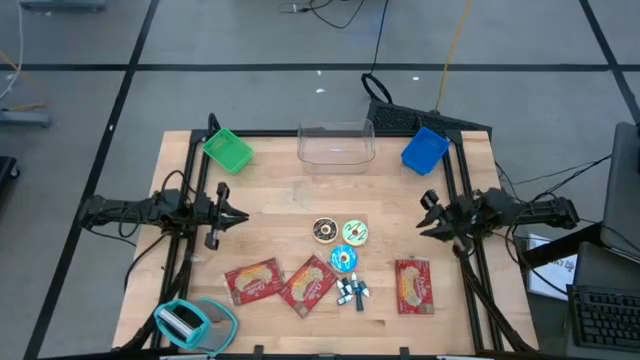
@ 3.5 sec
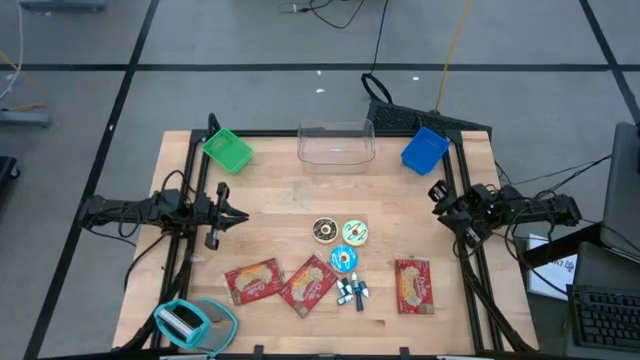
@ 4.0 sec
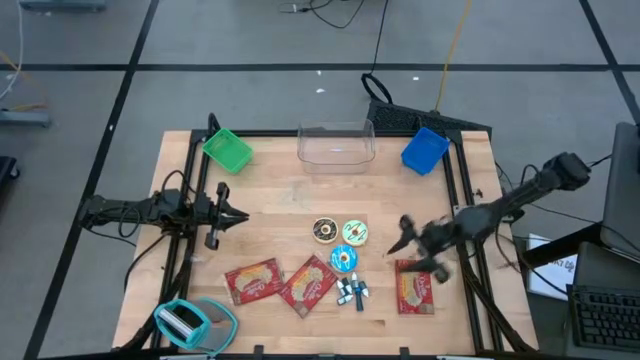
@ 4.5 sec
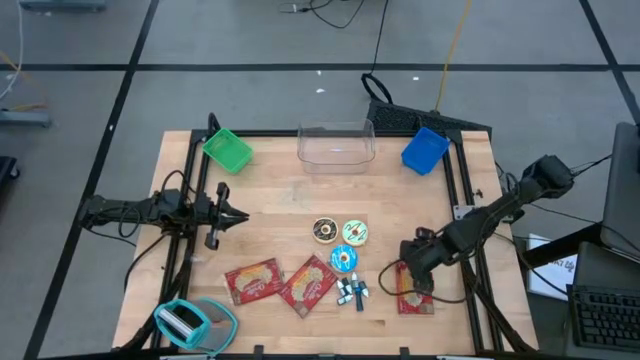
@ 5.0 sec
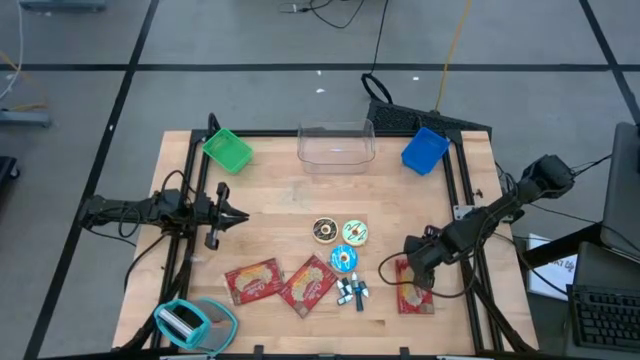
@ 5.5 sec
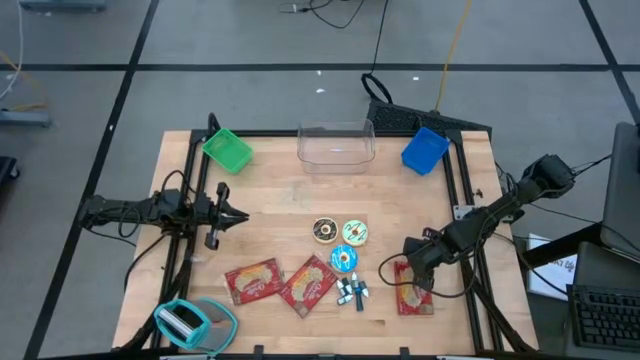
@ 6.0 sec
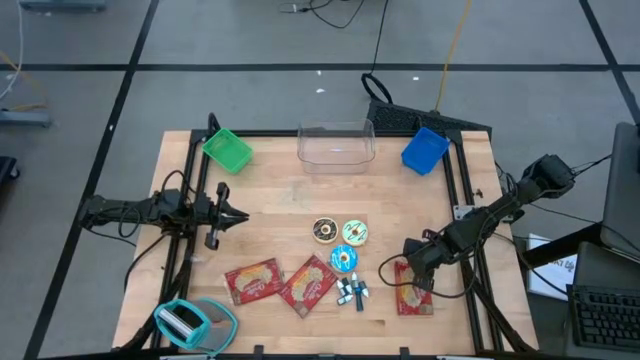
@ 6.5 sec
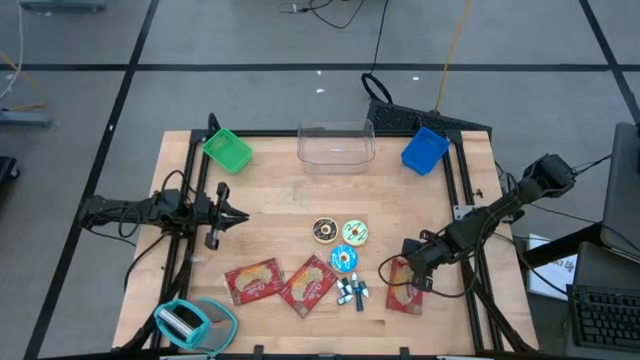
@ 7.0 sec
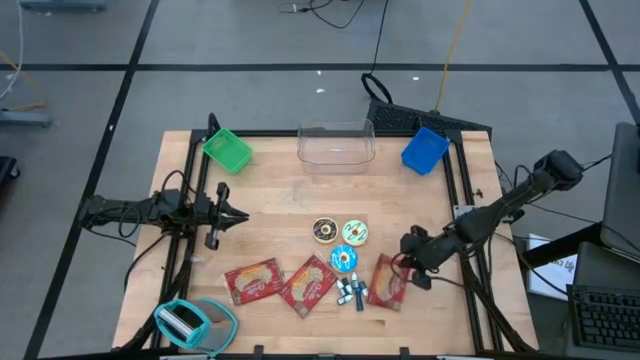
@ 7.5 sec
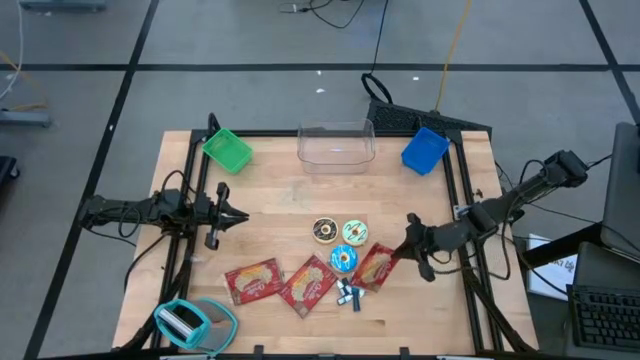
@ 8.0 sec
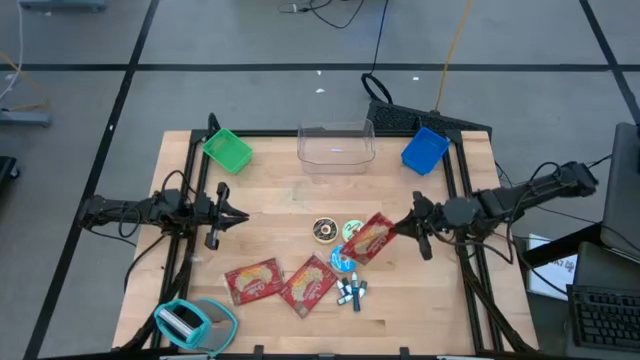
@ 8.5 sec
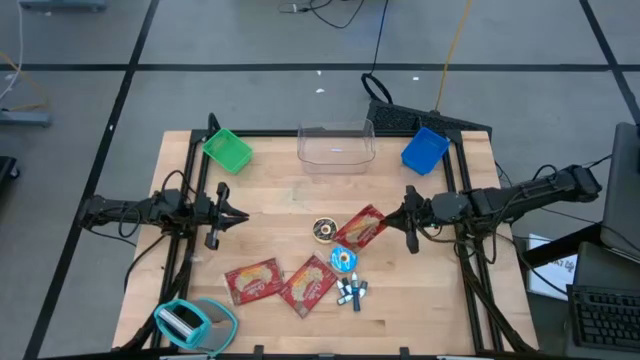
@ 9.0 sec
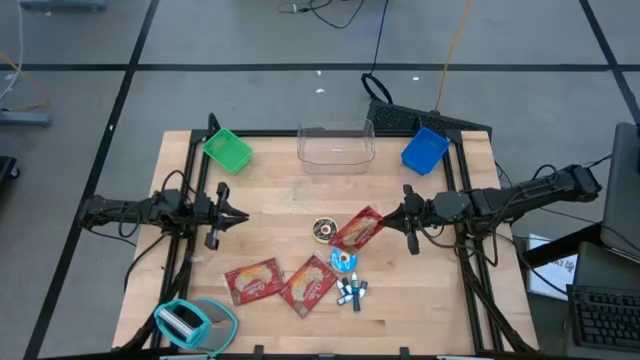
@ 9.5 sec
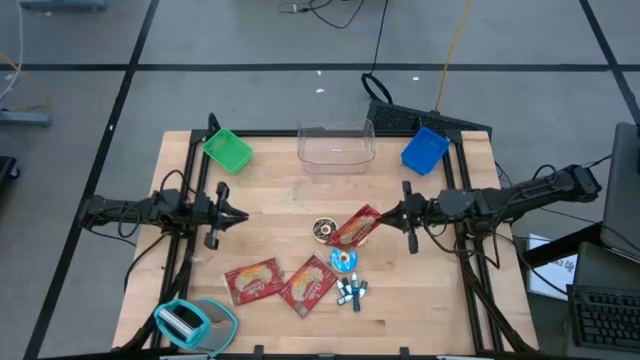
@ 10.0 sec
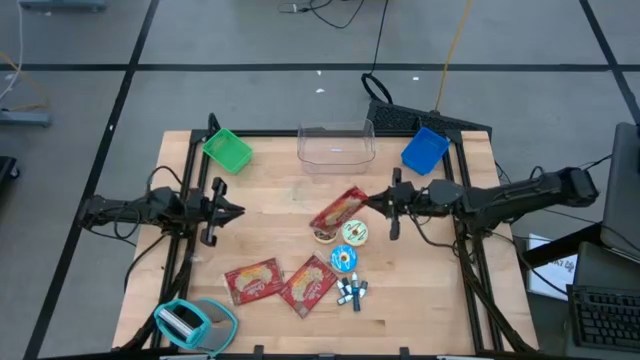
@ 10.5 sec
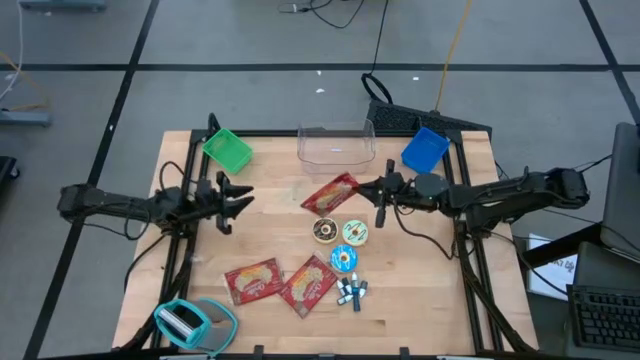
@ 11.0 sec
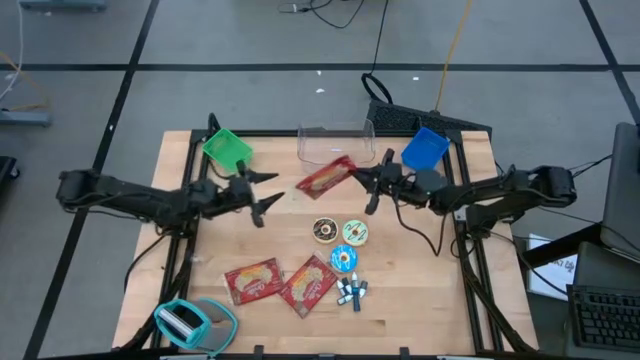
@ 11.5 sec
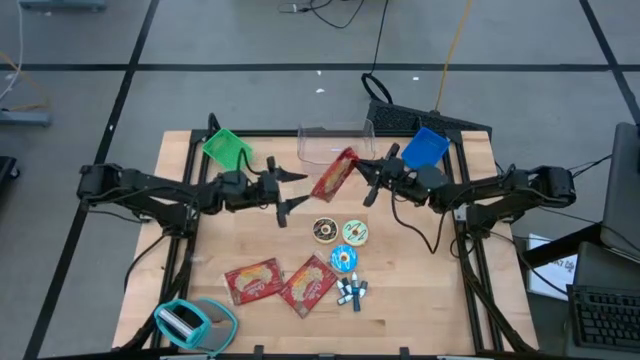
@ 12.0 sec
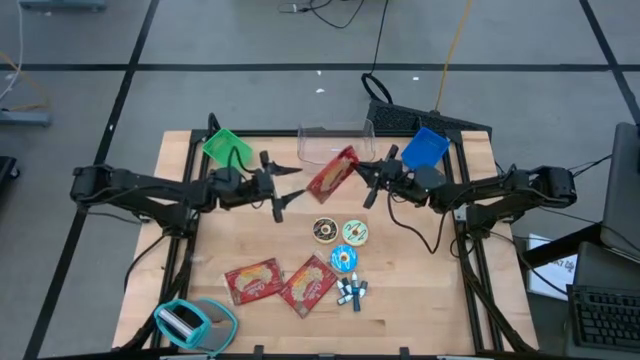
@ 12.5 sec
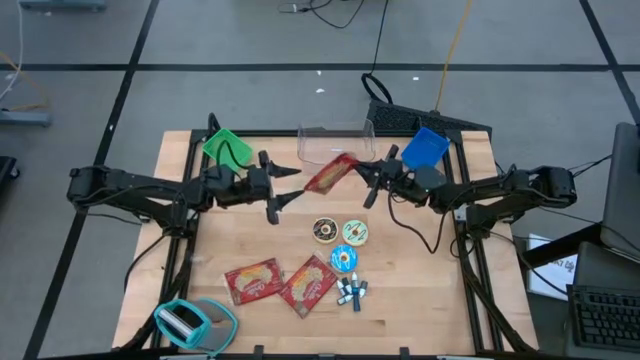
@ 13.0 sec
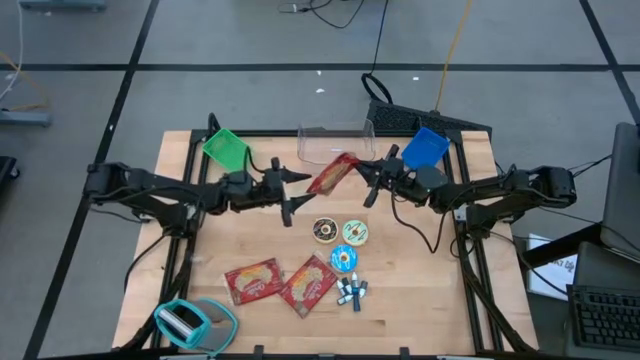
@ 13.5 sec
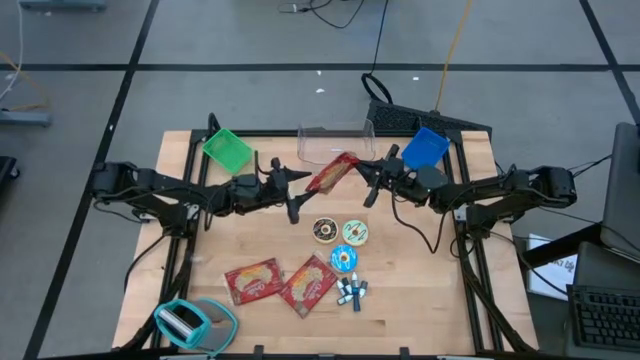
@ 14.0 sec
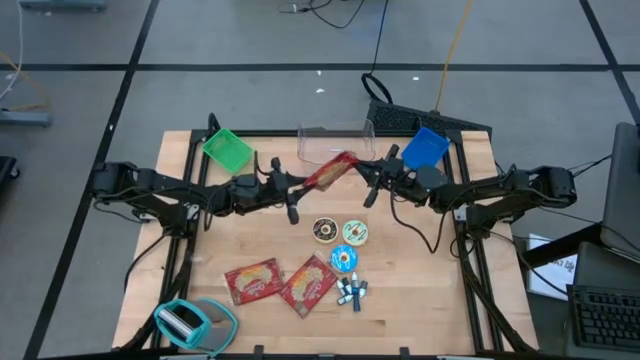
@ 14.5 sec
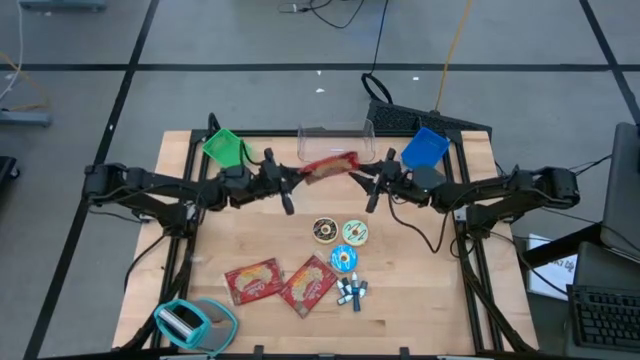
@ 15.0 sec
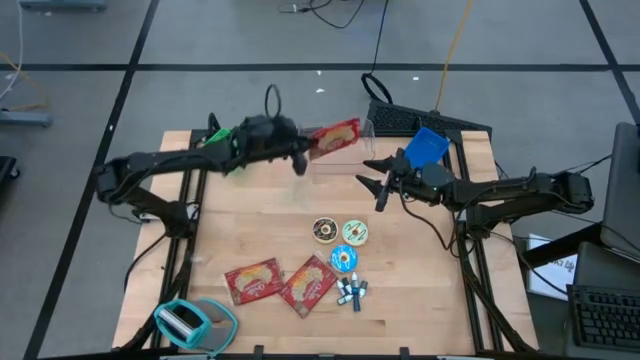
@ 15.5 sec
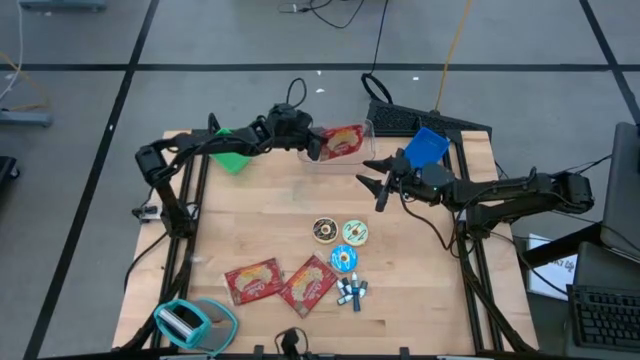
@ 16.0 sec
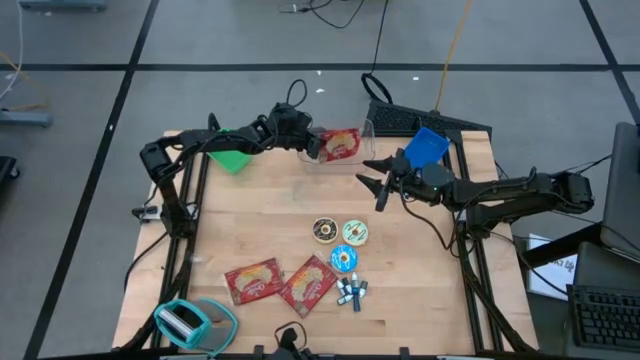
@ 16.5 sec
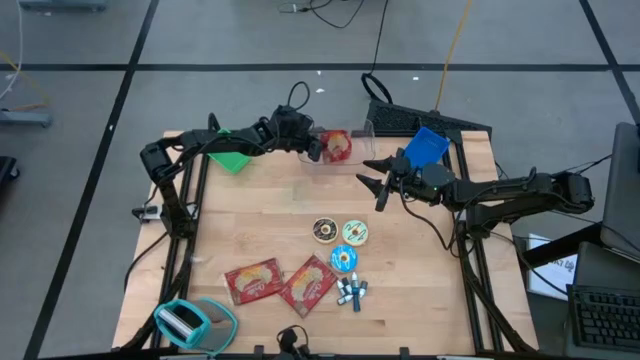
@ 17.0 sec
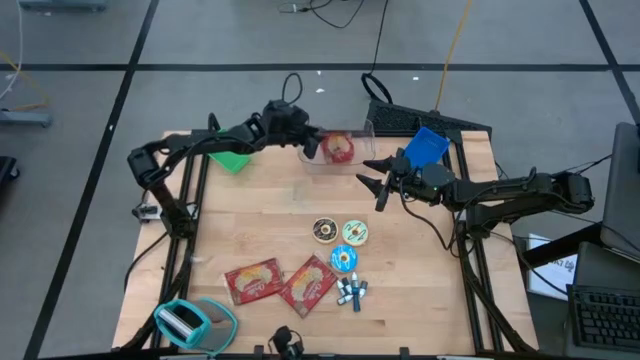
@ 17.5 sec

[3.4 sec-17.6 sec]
Put the right popcorn bag into the transparent bin

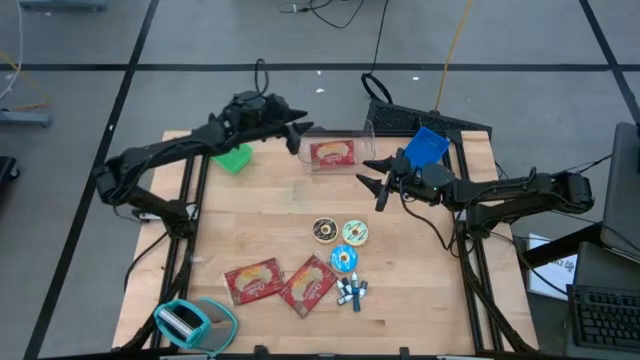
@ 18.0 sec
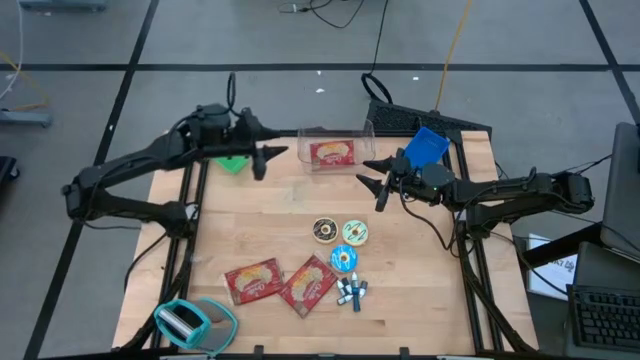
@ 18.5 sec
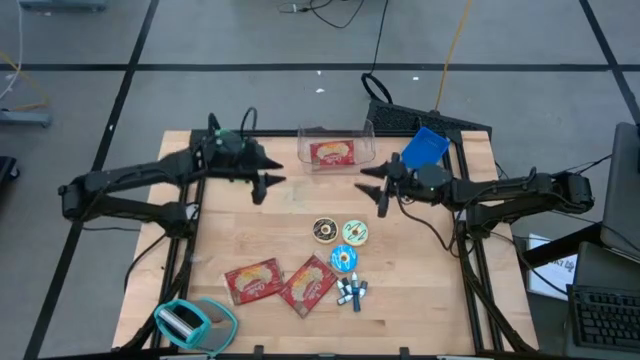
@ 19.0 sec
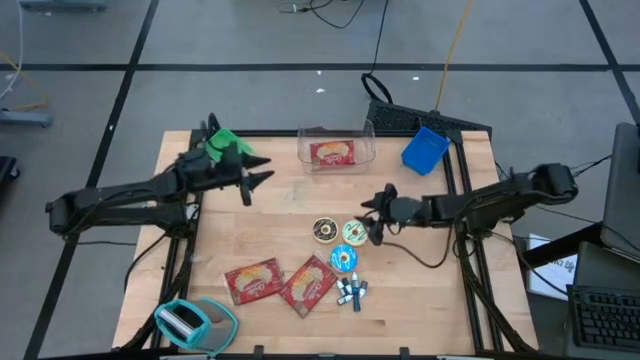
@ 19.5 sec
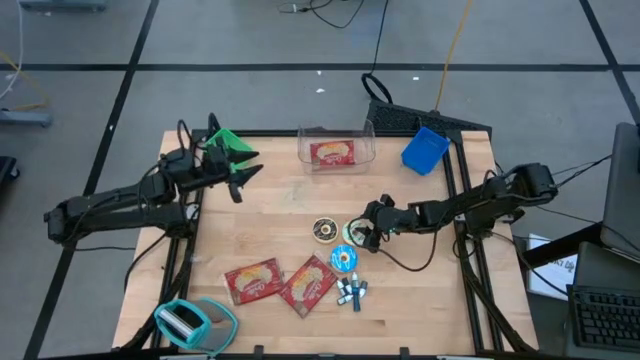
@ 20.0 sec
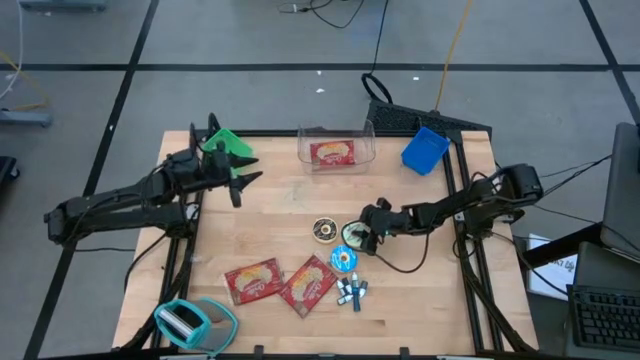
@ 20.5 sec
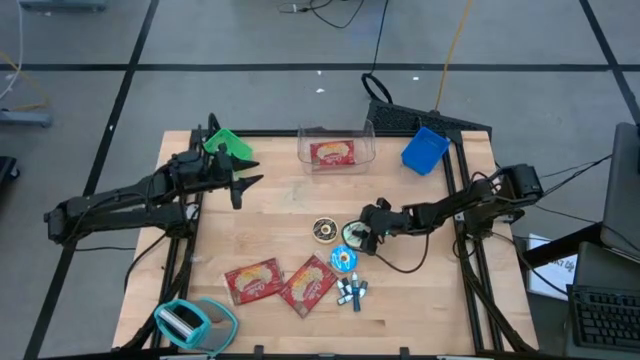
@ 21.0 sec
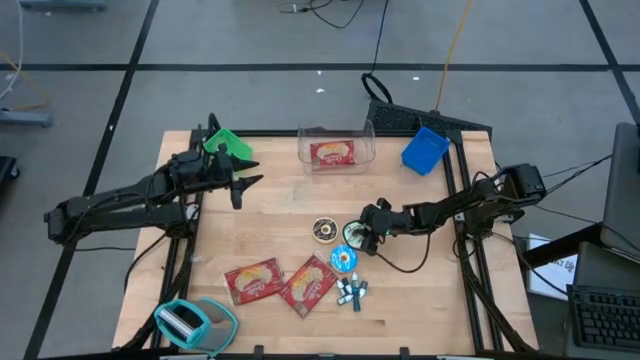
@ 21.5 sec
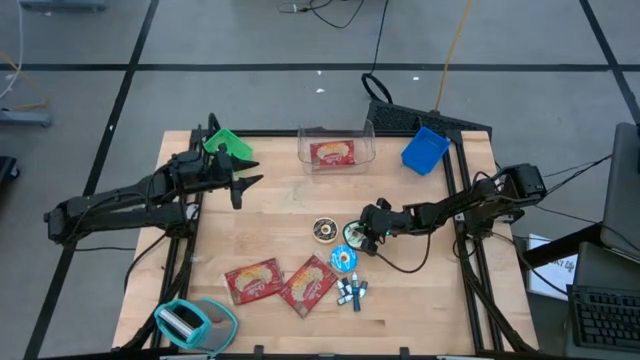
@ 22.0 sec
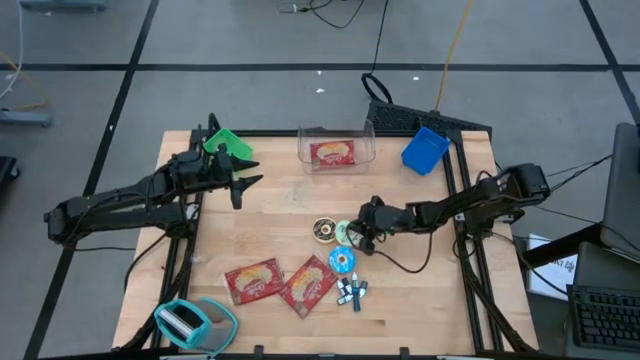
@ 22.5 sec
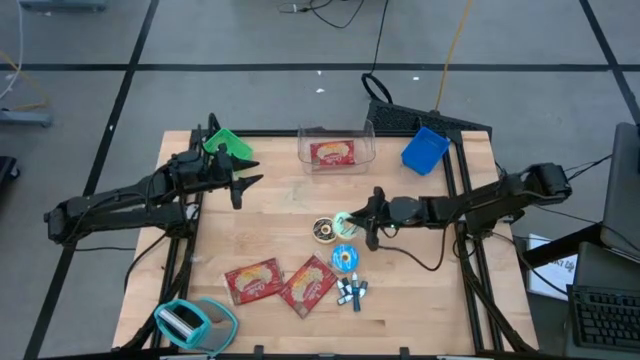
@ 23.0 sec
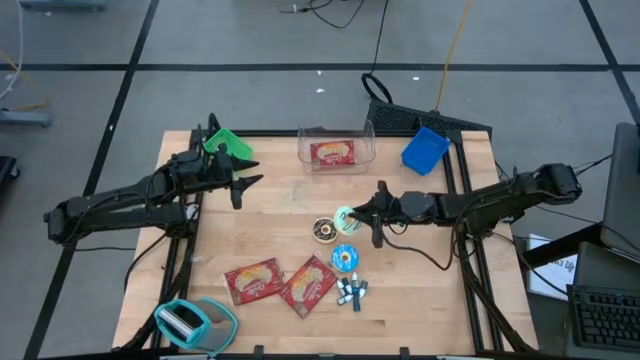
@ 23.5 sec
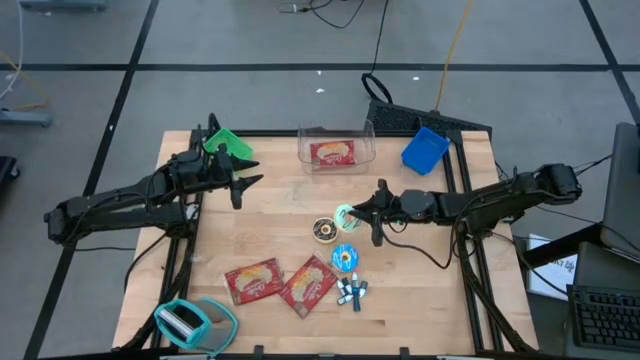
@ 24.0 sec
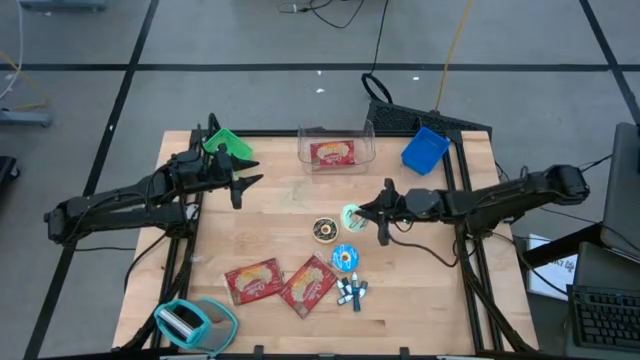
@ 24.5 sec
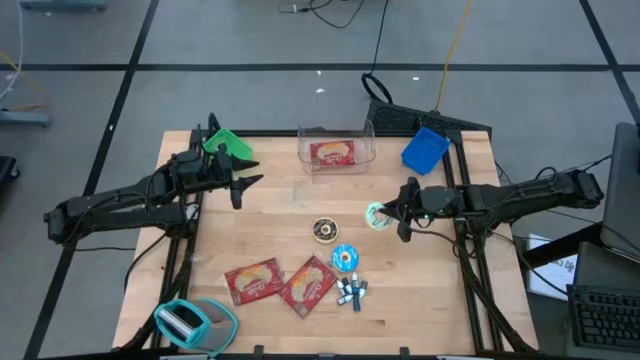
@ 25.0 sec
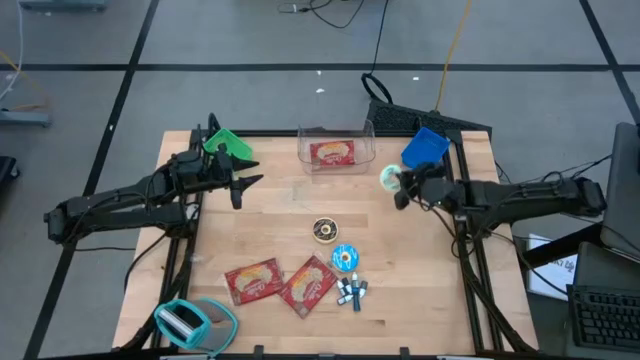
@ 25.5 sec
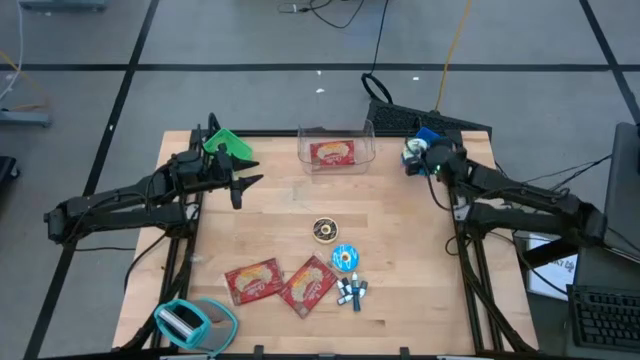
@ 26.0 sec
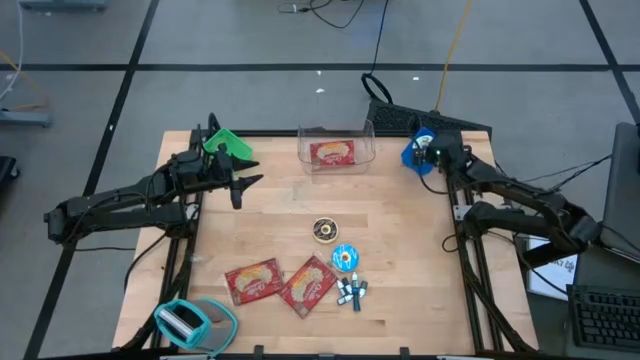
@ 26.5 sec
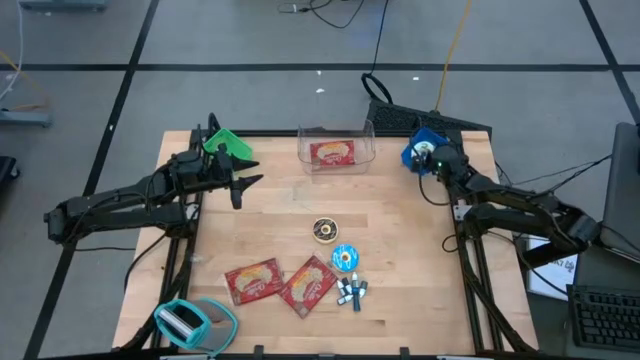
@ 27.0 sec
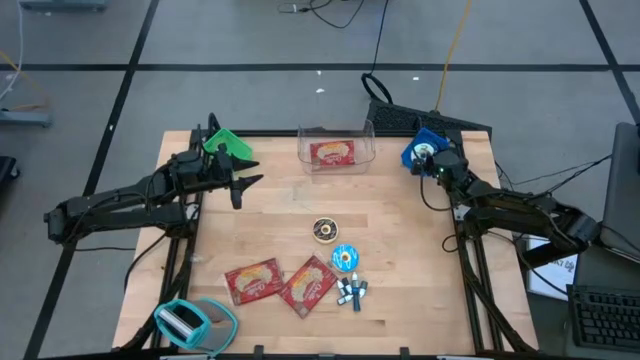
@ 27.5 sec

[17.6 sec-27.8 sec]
Put the mint green donut into the blue bin
